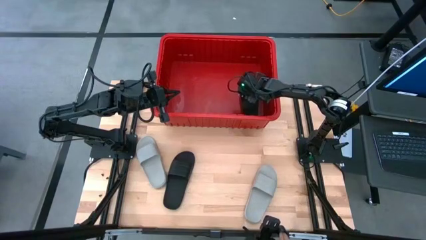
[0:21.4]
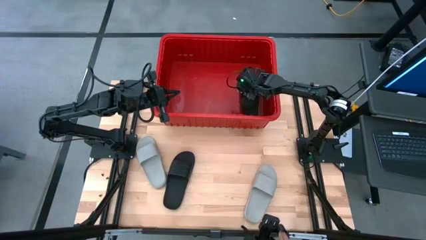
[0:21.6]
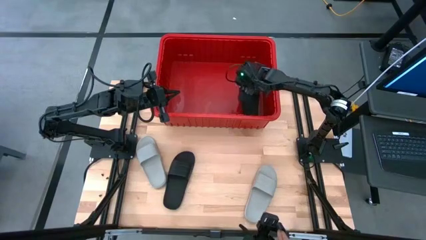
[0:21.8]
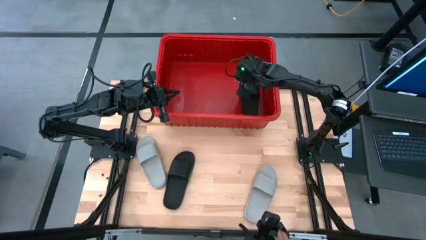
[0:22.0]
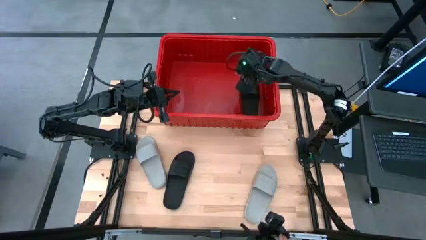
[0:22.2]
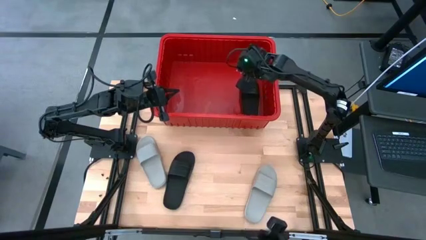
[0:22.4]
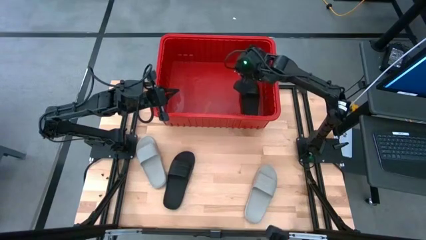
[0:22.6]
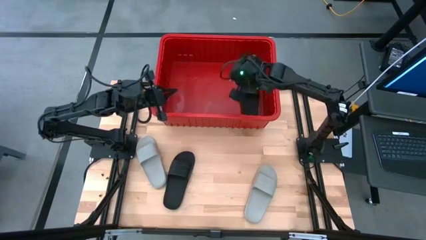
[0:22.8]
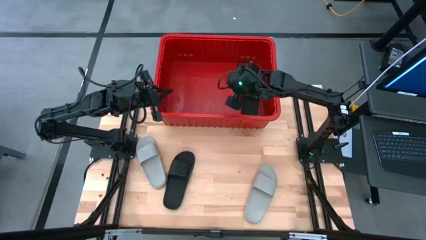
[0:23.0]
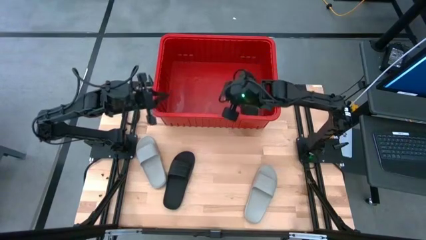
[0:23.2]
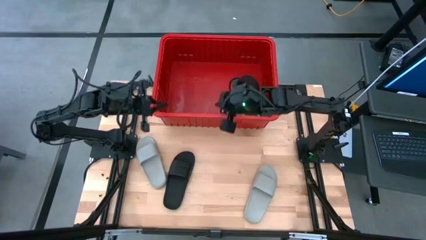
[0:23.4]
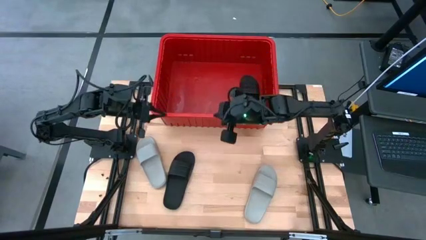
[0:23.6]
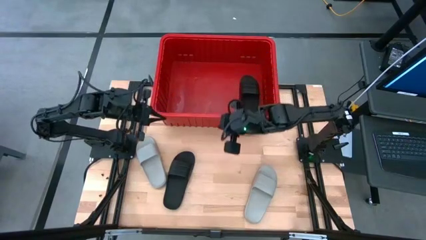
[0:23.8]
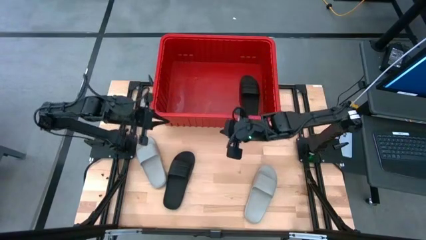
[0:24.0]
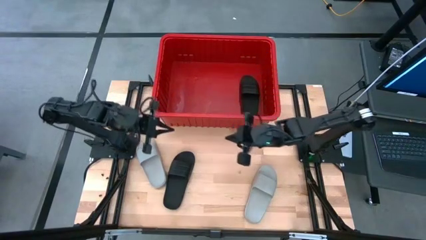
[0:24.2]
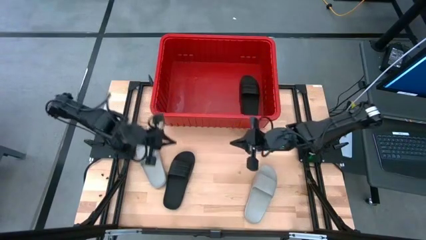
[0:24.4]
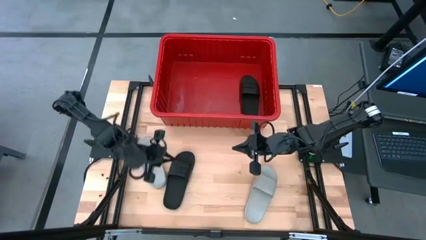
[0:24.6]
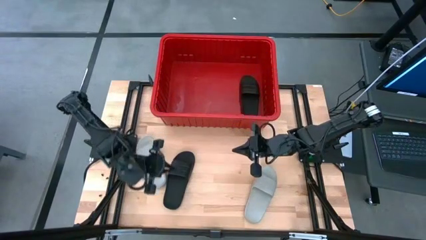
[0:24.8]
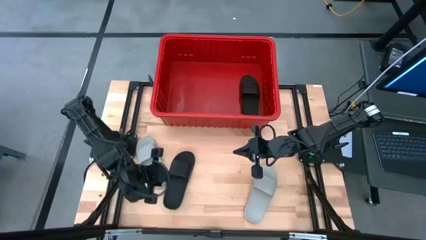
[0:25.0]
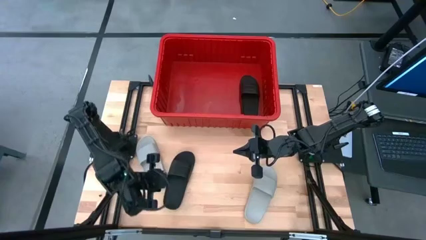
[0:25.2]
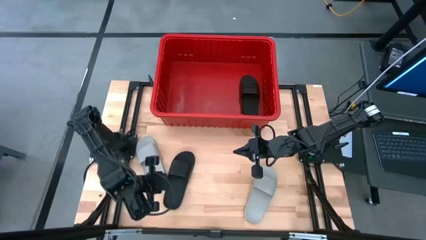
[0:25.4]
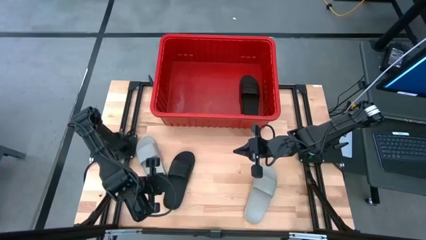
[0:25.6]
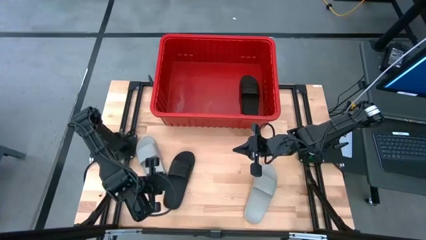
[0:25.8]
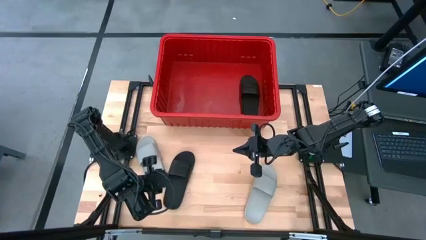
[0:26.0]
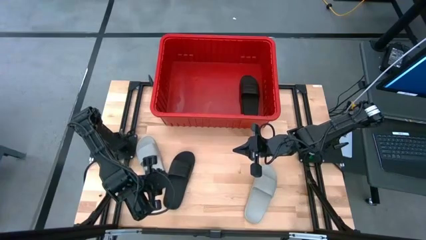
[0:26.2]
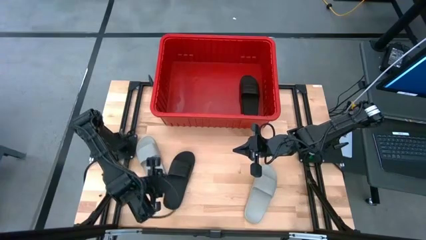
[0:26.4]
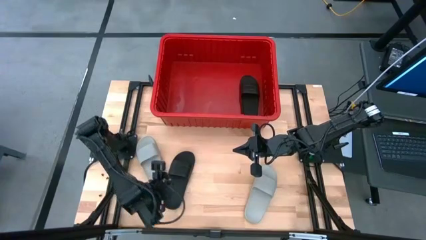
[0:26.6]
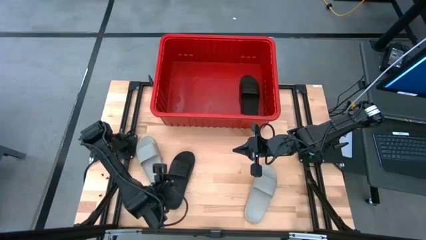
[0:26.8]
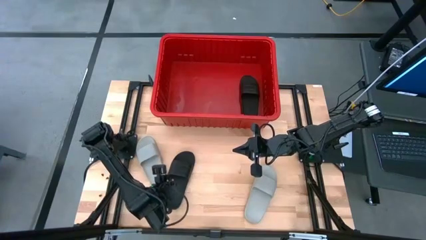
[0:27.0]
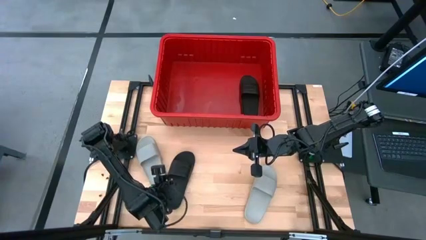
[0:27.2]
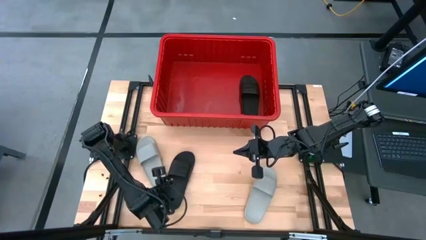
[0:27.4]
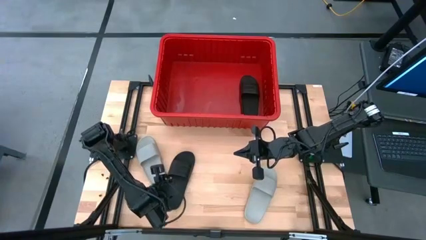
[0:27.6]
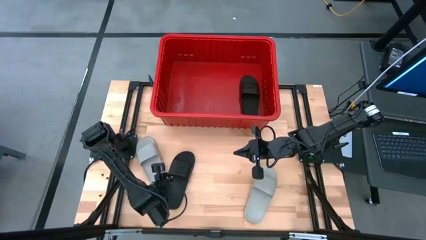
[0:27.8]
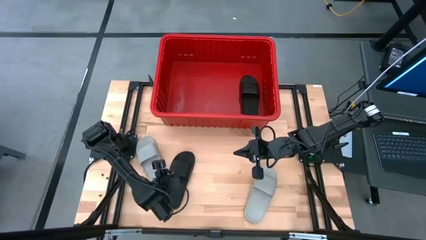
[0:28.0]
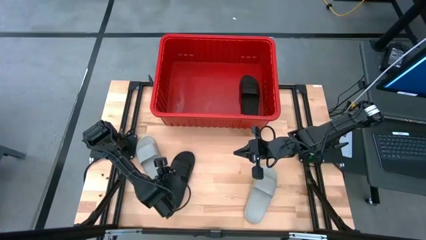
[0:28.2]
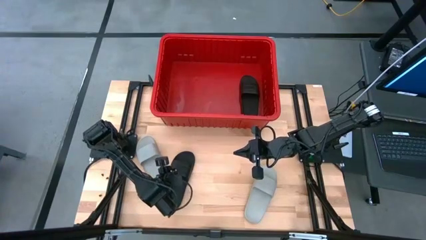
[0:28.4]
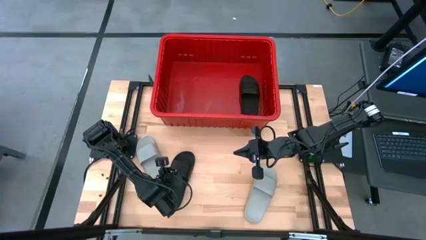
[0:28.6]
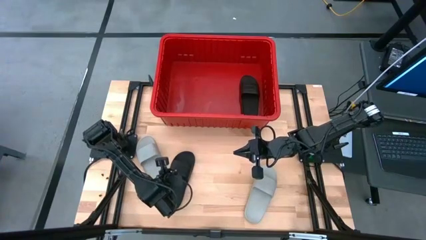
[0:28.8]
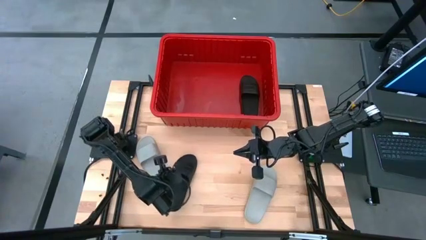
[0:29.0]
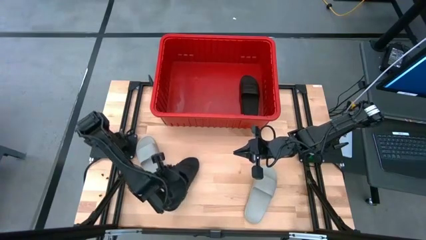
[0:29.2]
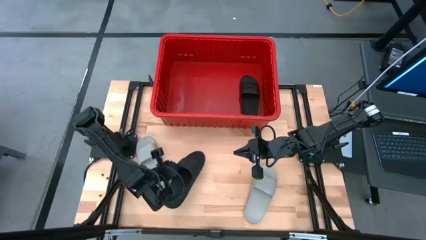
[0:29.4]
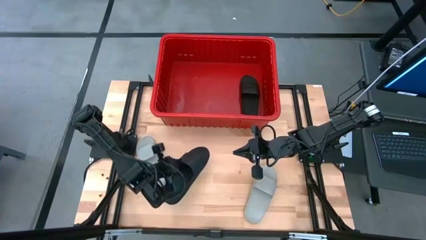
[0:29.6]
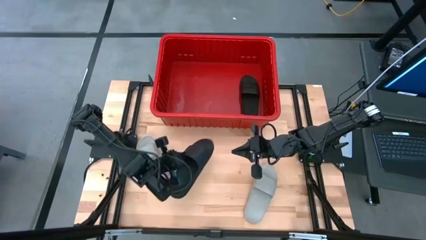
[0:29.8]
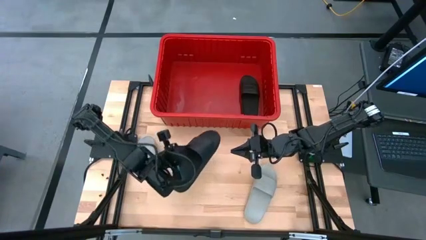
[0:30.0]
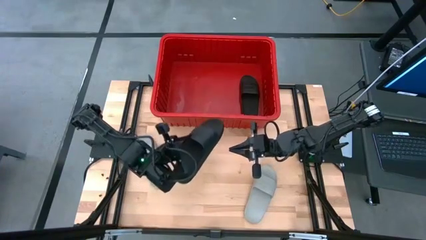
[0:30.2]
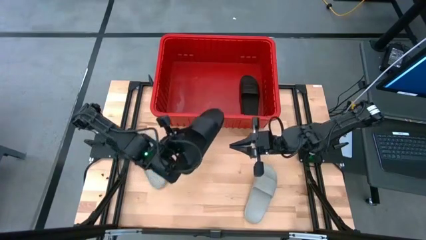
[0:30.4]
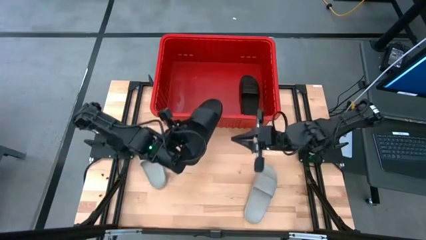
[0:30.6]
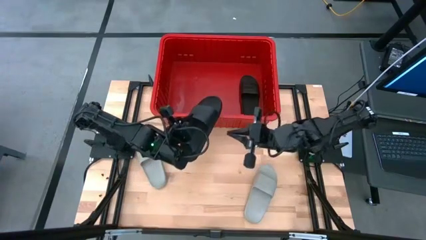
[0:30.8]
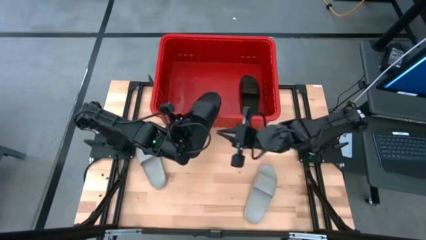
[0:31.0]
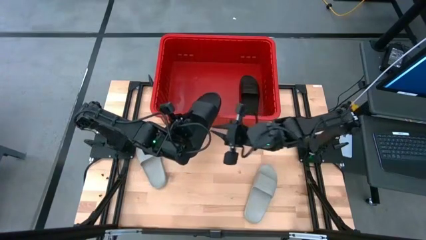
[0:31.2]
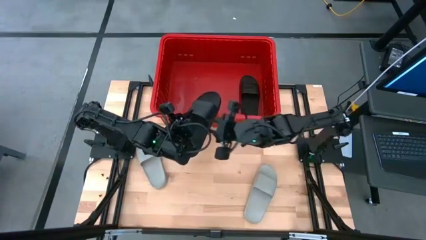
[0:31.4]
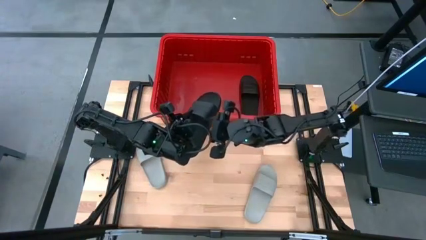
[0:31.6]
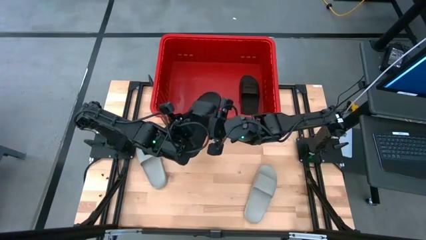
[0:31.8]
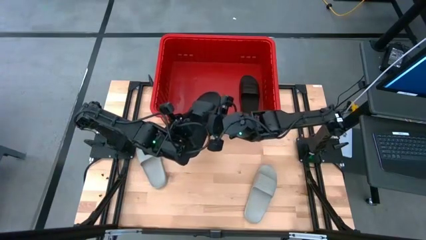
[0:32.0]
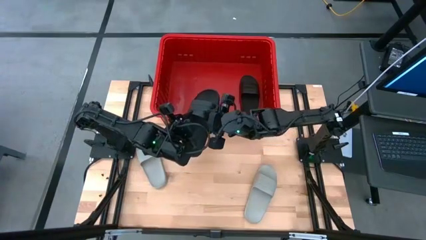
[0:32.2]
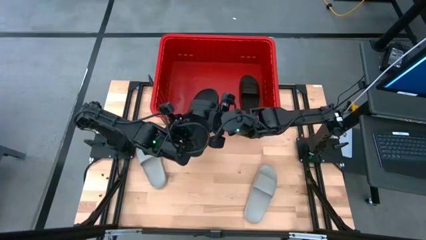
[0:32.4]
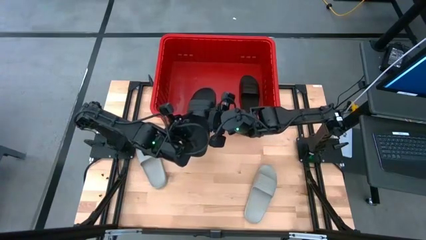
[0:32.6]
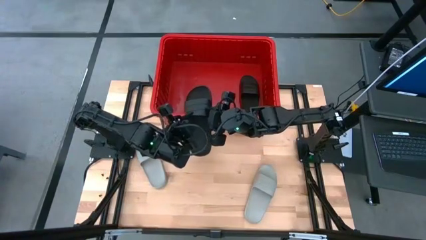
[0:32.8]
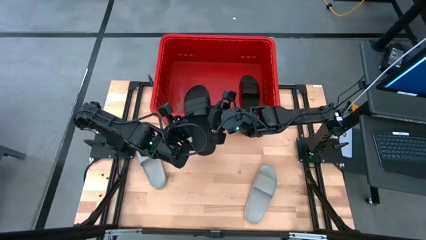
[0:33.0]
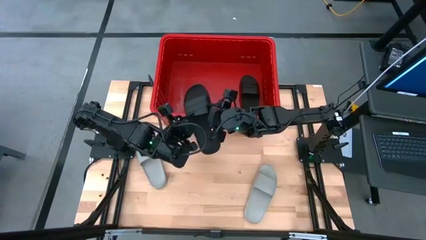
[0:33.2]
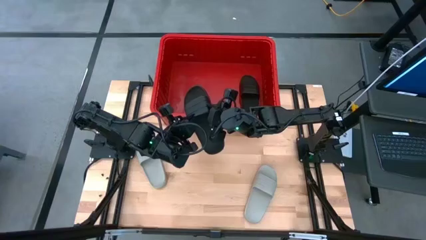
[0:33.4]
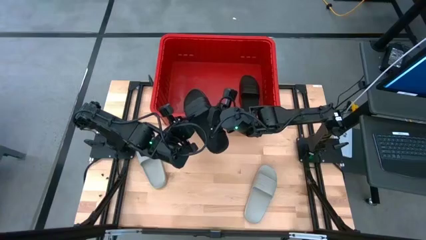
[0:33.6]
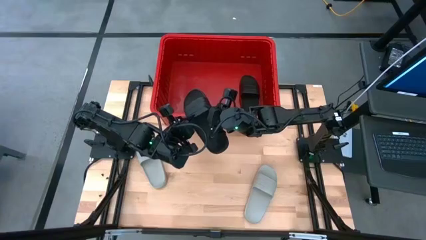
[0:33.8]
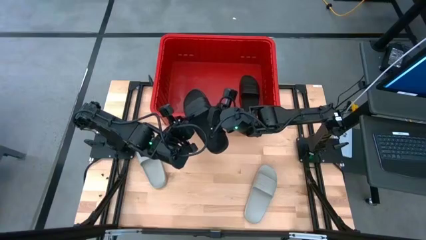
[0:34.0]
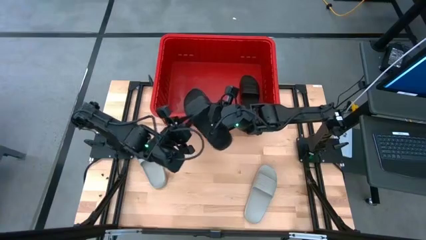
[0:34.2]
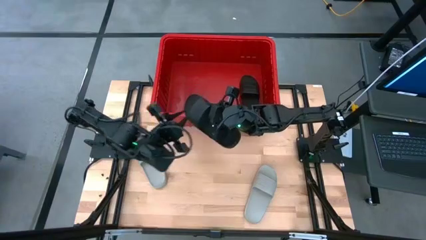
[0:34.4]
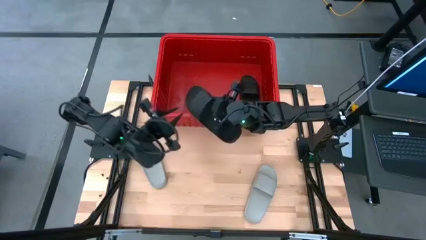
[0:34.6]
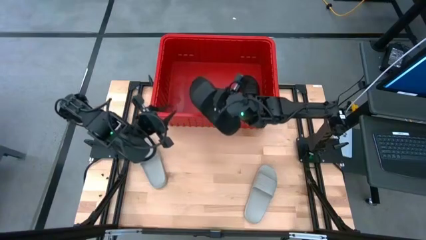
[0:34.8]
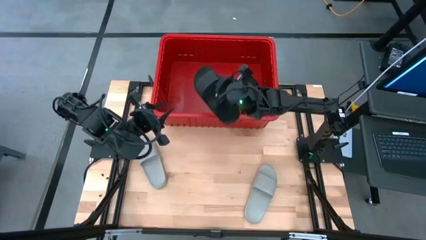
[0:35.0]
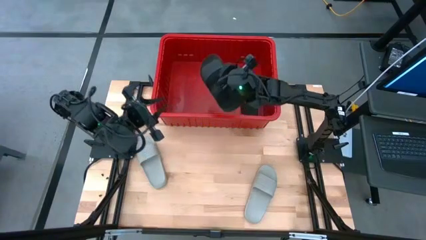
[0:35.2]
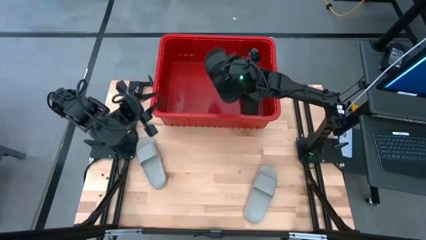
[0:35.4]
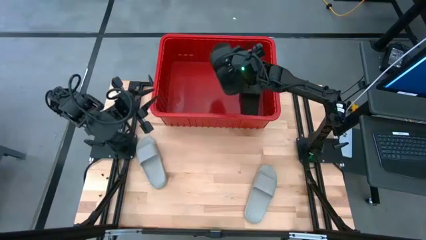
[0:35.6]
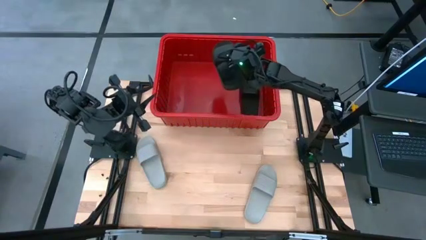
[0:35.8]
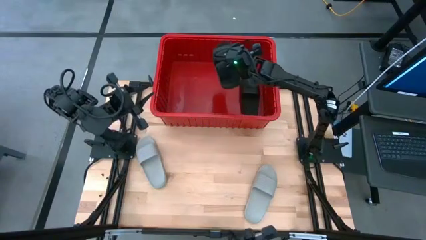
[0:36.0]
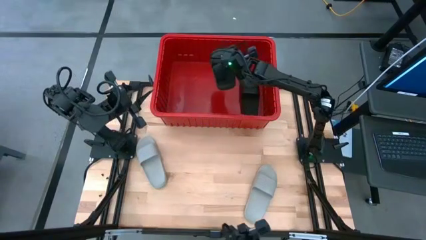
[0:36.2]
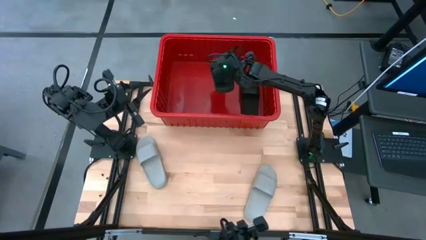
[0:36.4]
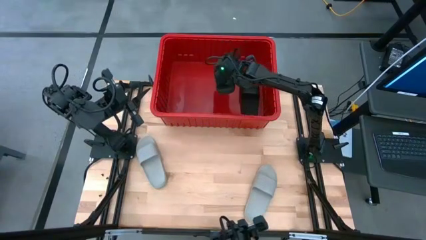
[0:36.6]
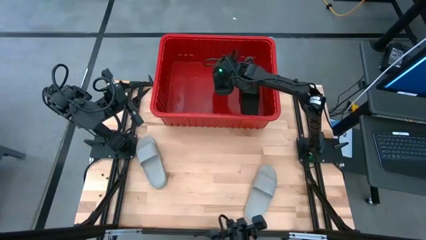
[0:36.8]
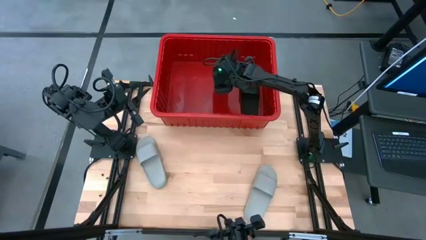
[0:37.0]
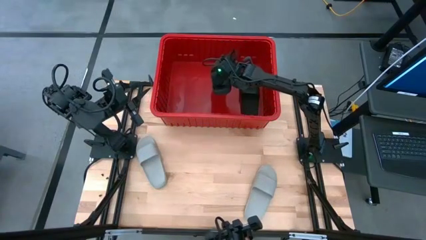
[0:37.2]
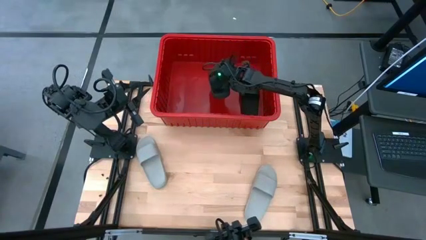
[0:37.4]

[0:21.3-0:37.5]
Task: Pick and place slides into bin
Put the black slide into the red bin

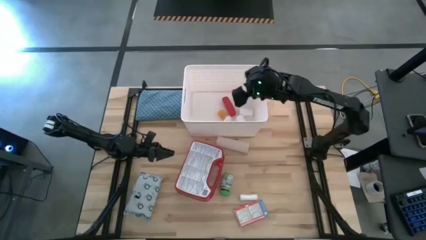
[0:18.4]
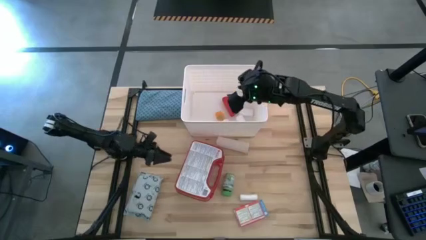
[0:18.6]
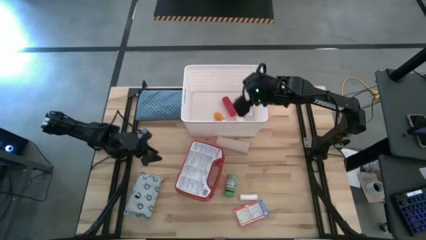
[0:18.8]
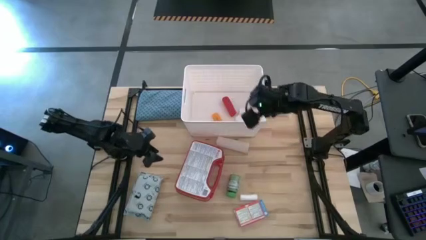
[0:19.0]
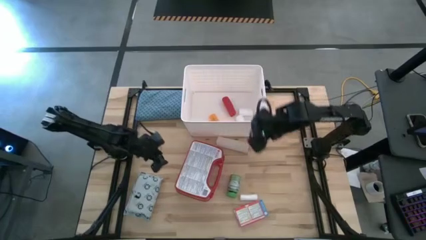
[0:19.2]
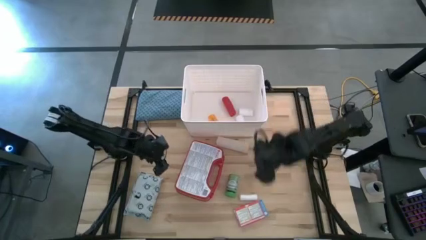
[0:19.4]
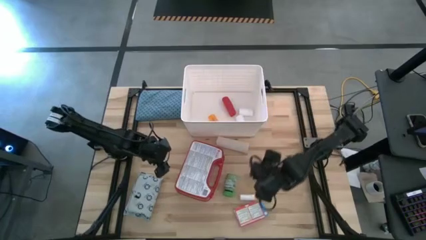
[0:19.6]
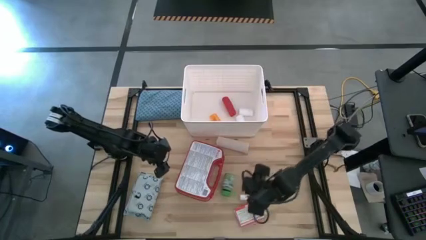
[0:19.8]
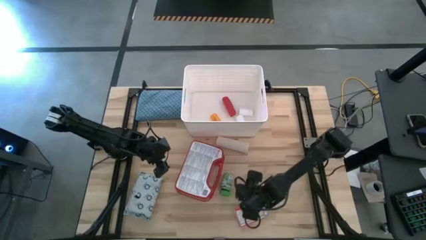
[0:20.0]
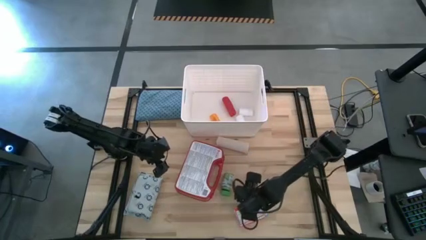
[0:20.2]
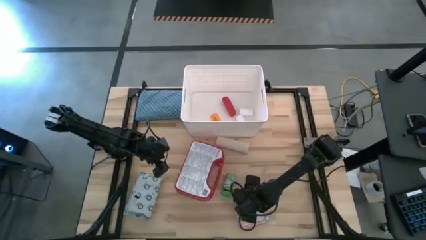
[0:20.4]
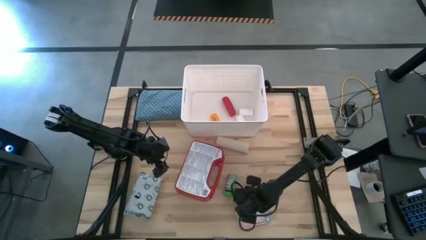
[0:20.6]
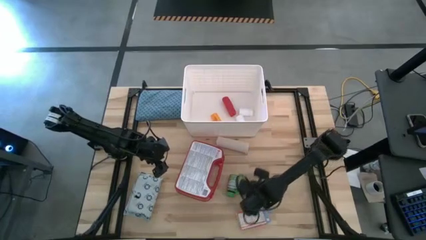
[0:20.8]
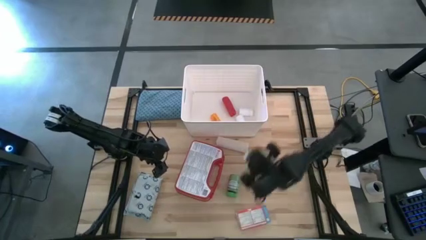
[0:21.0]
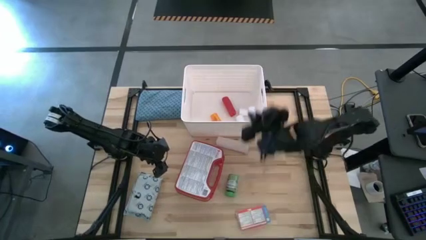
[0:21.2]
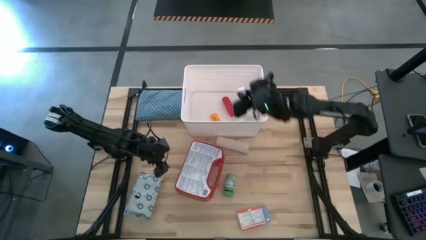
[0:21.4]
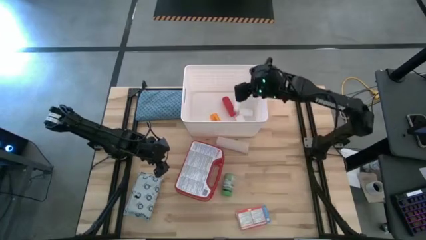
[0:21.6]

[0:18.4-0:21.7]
Task: Pick & place medical supplies in basket/bin
Put the white bandage into the white bin
